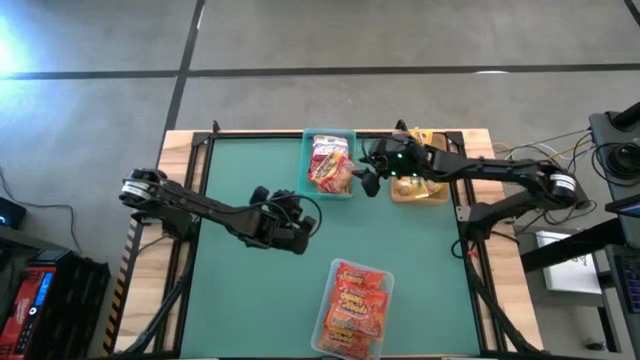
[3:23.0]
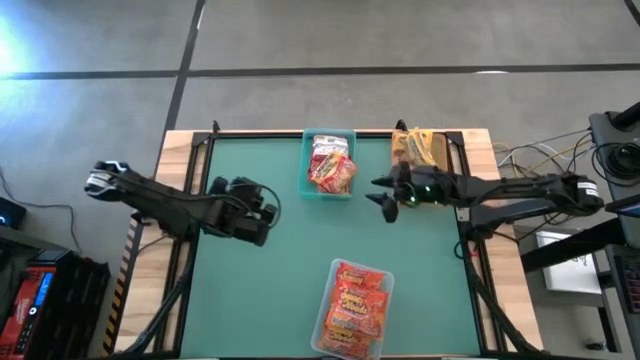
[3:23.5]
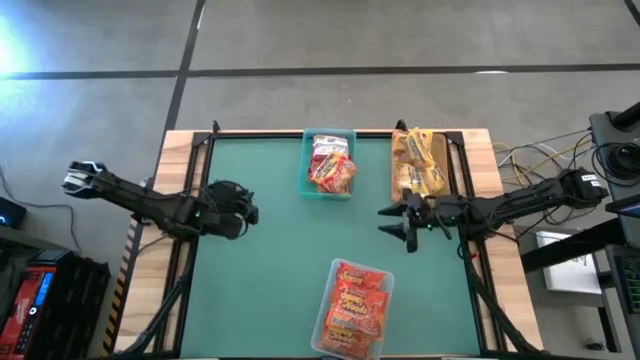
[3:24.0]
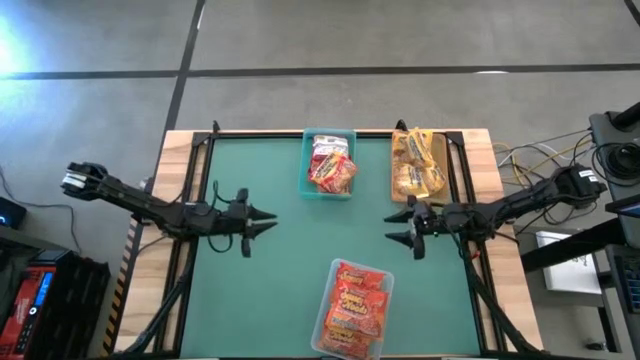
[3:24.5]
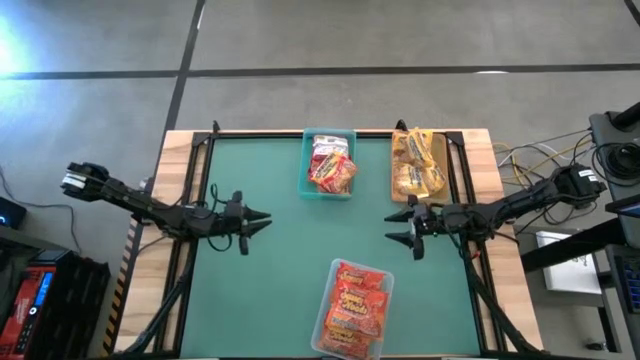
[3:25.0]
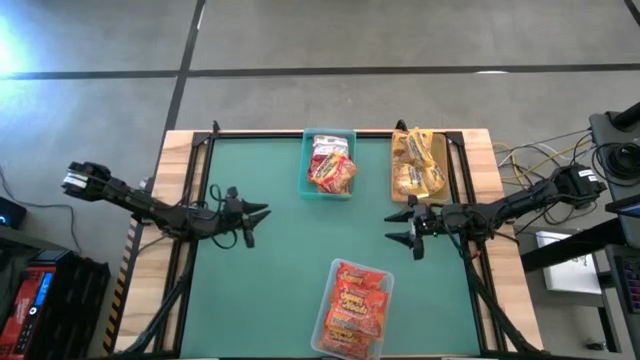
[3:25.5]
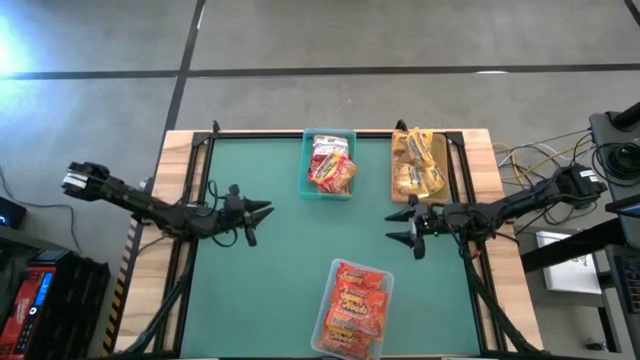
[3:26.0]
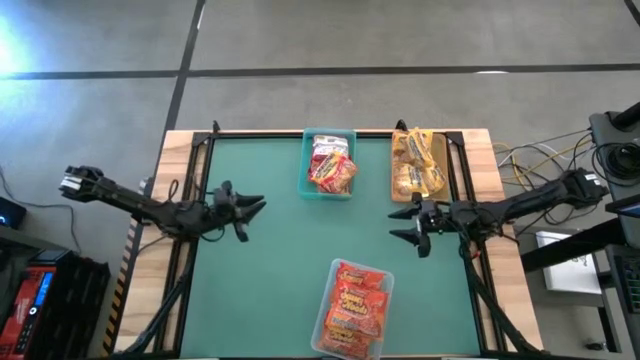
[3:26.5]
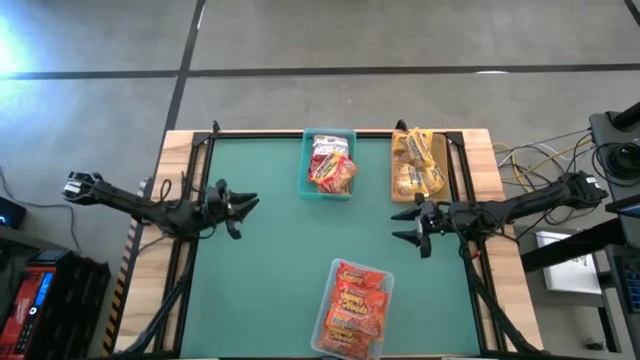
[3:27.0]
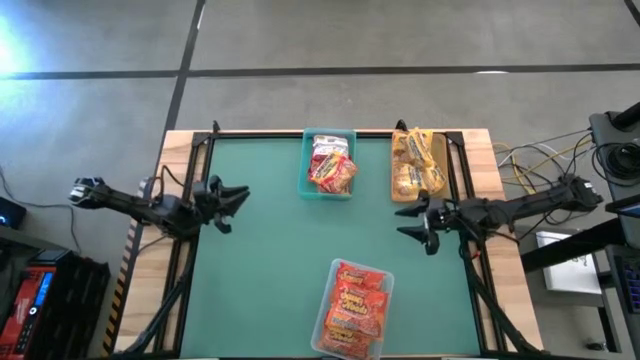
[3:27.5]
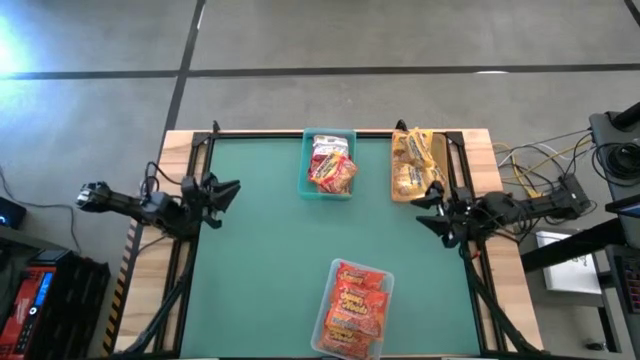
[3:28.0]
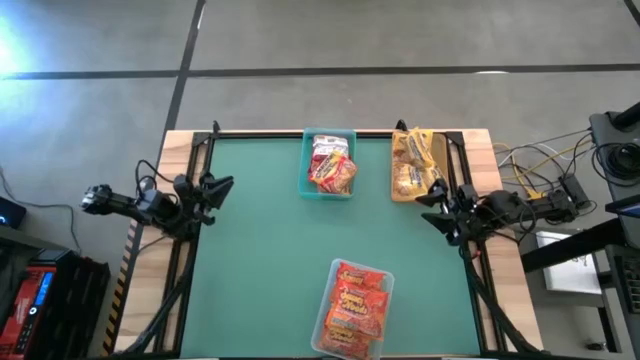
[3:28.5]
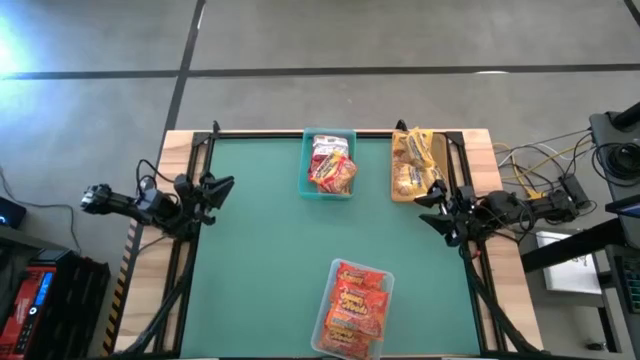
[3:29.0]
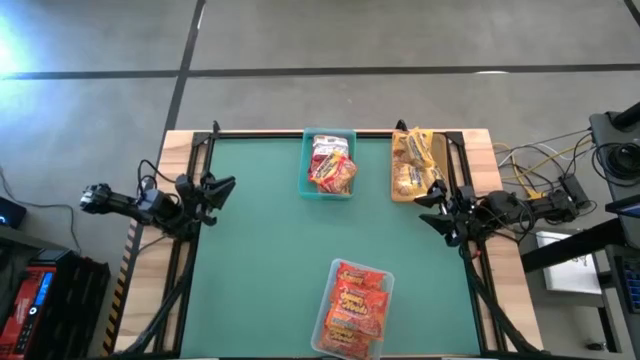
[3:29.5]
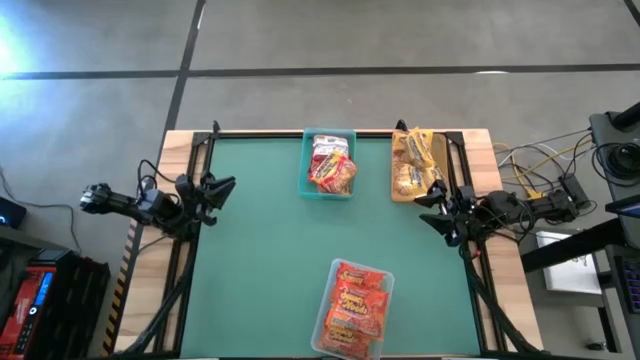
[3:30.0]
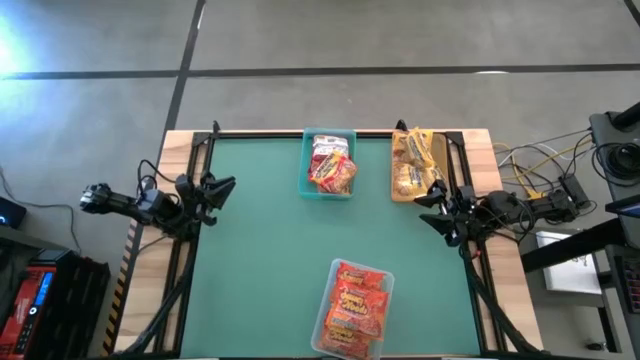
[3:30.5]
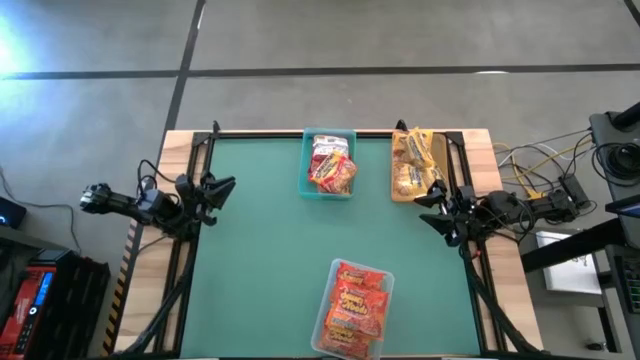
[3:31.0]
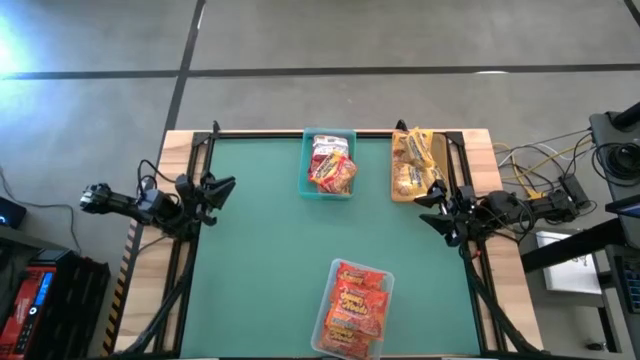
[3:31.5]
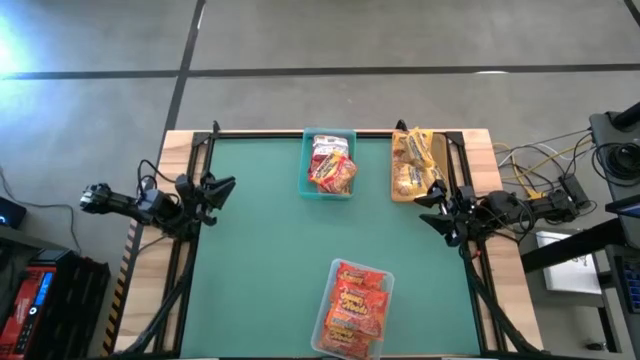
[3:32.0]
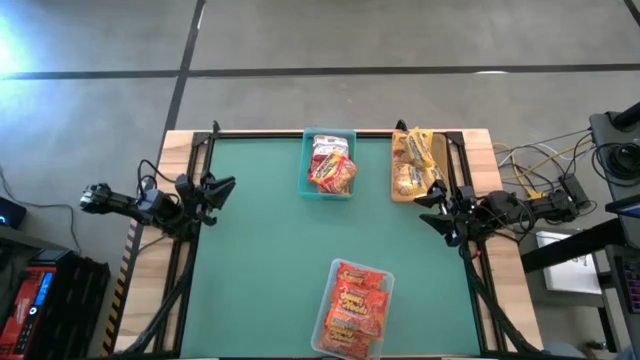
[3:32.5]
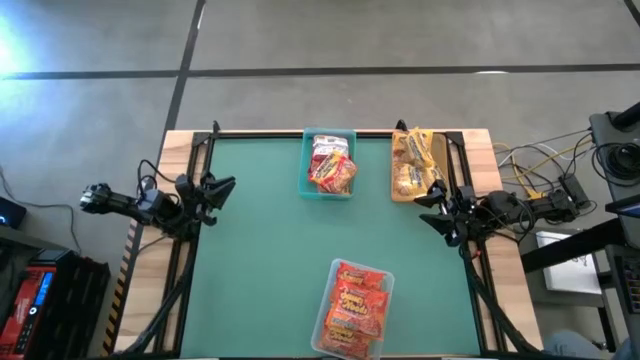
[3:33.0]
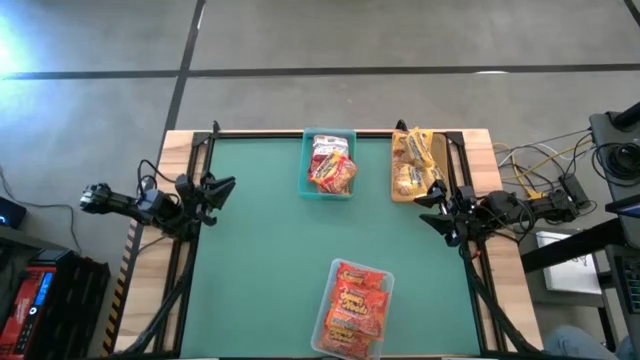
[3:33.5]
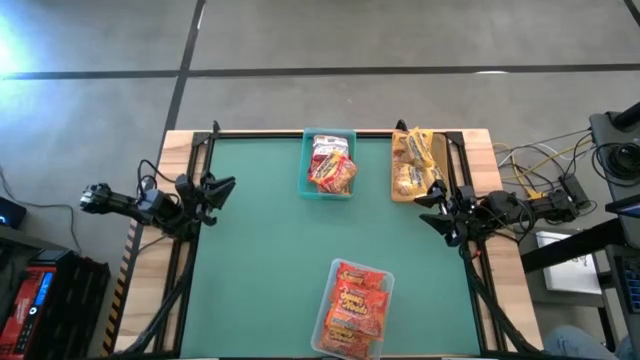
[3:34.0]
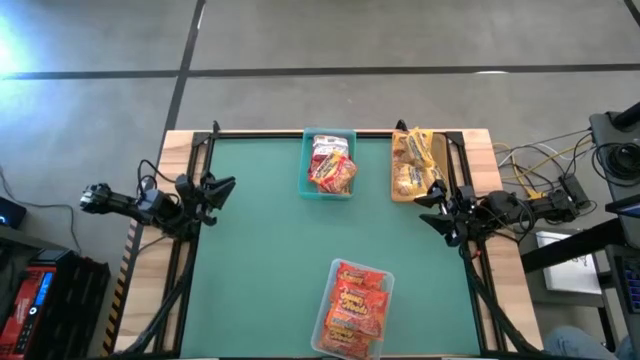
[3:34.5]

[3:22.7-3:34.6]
Task: Sort Maruchan noodles
Return to Home Position

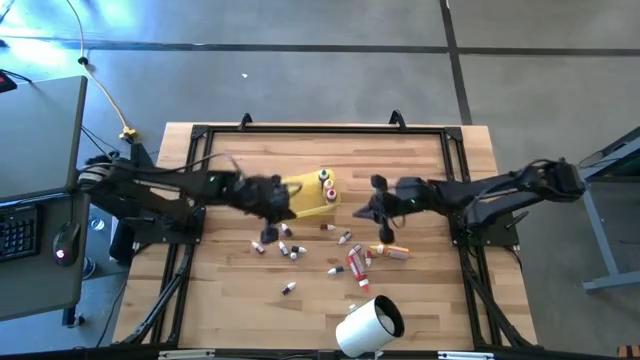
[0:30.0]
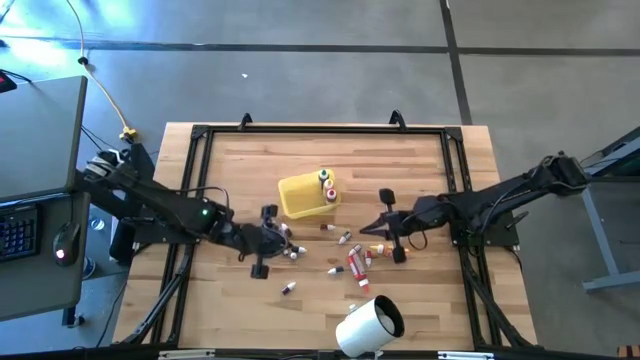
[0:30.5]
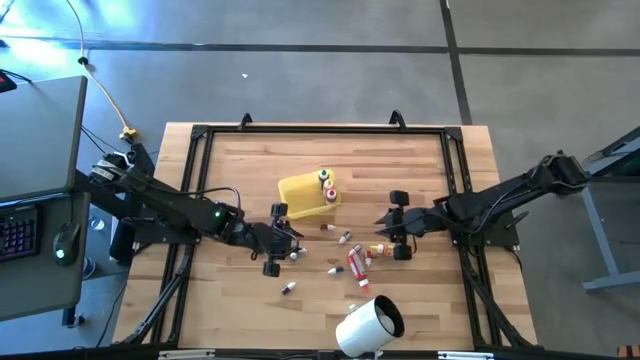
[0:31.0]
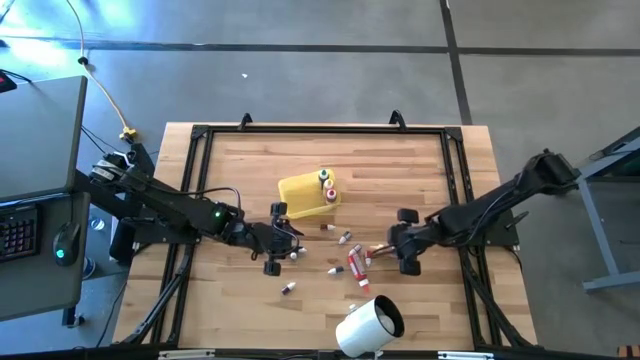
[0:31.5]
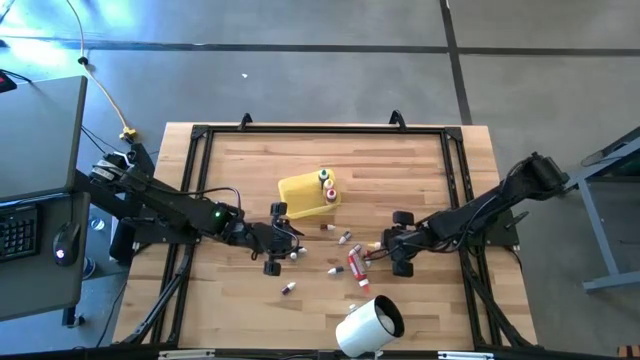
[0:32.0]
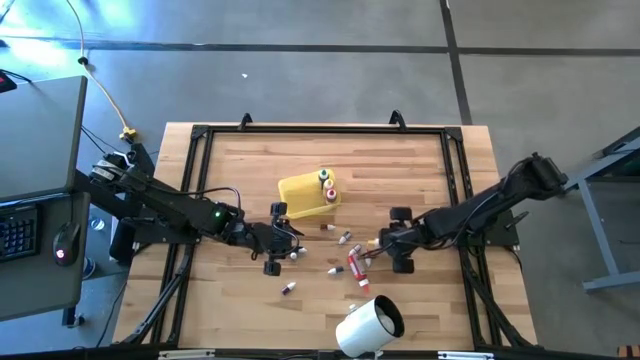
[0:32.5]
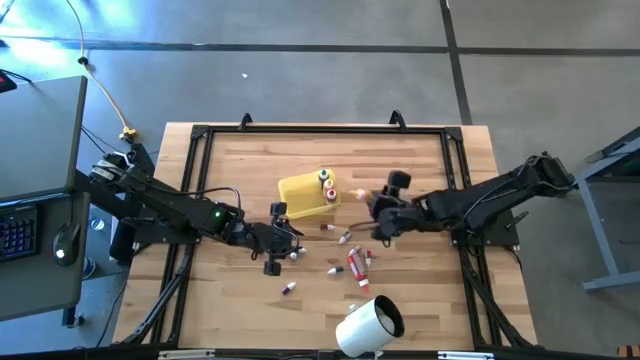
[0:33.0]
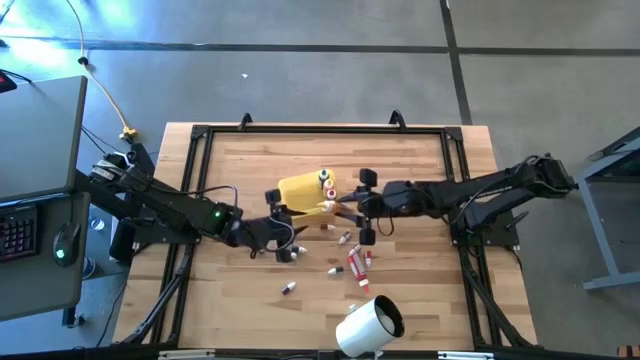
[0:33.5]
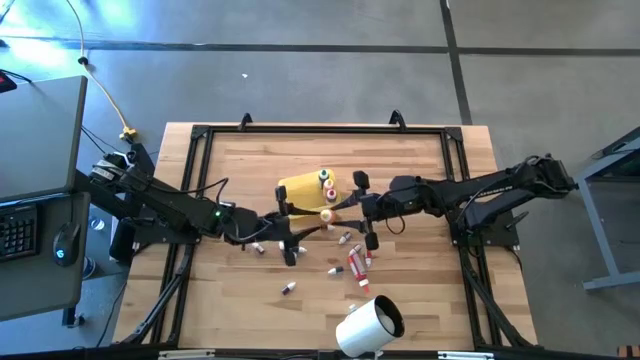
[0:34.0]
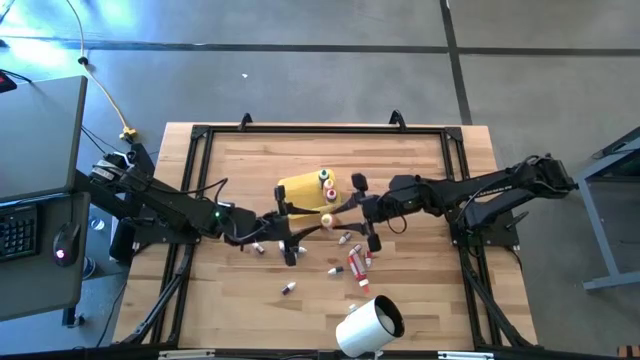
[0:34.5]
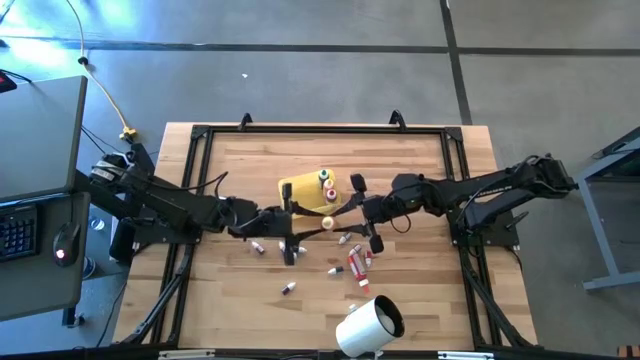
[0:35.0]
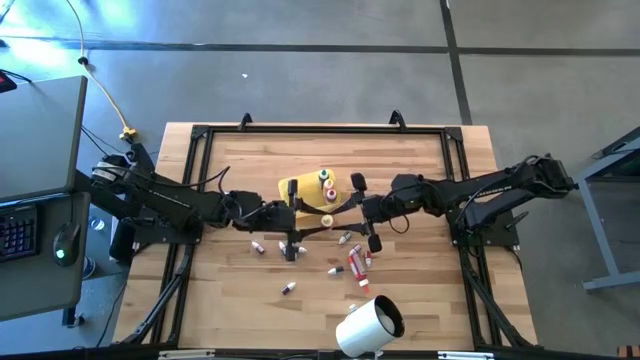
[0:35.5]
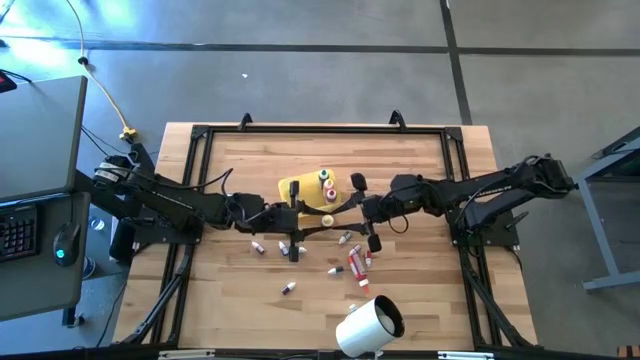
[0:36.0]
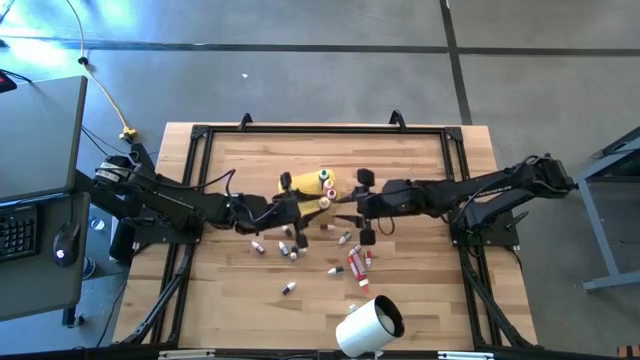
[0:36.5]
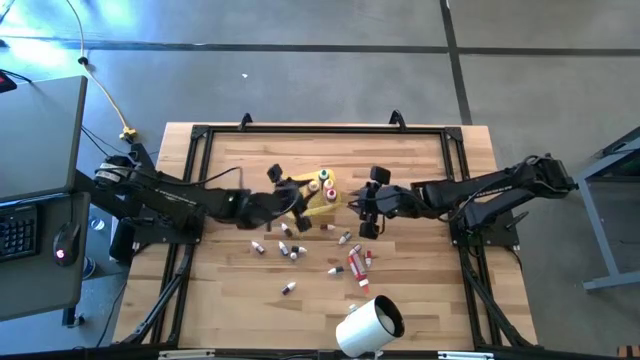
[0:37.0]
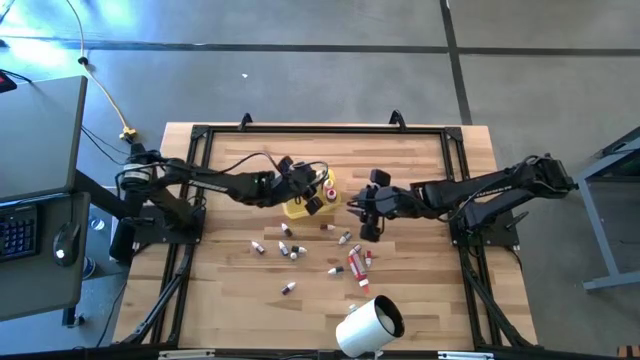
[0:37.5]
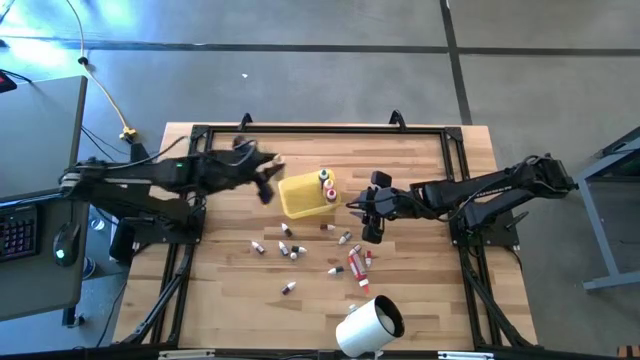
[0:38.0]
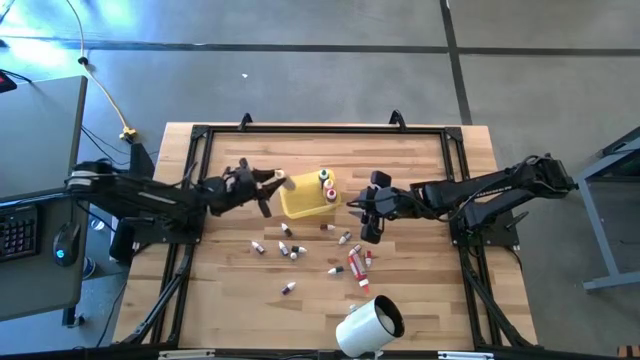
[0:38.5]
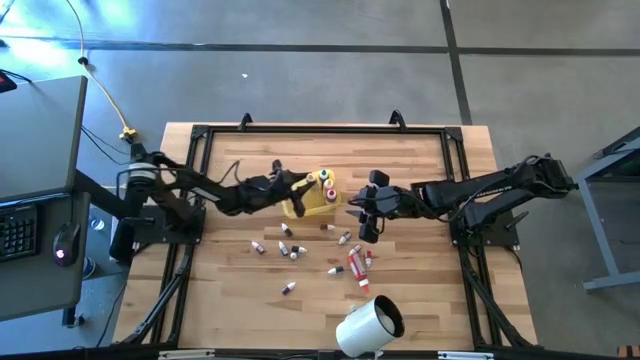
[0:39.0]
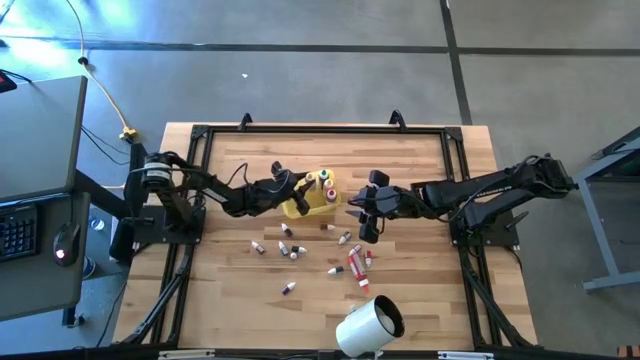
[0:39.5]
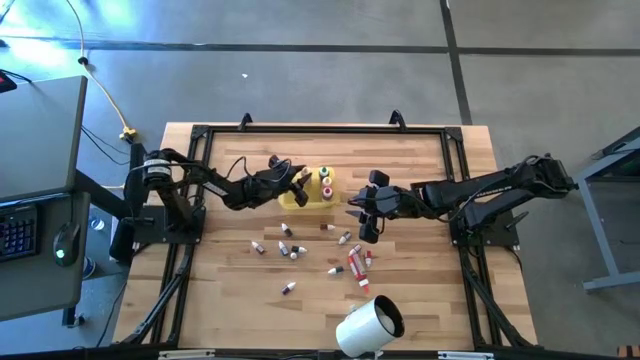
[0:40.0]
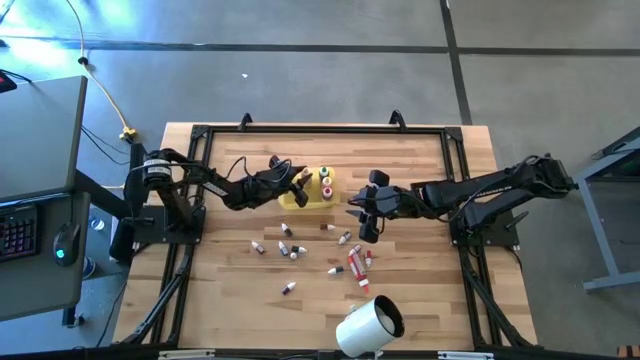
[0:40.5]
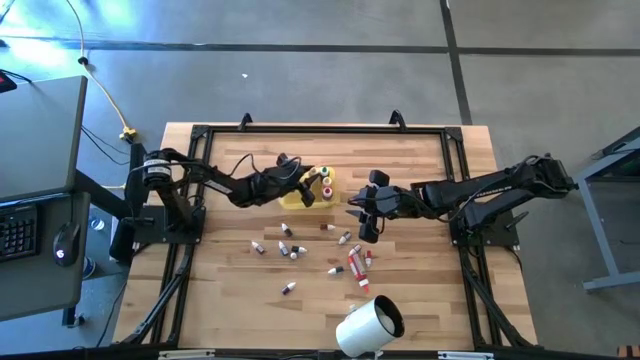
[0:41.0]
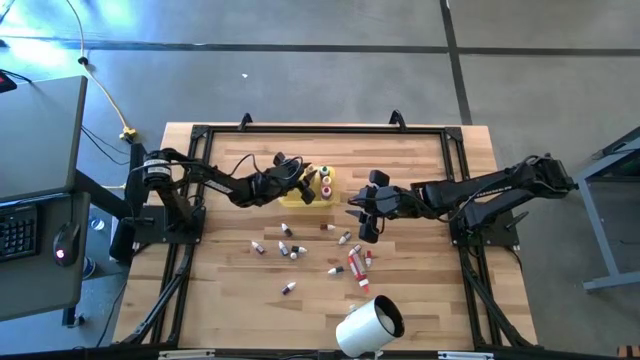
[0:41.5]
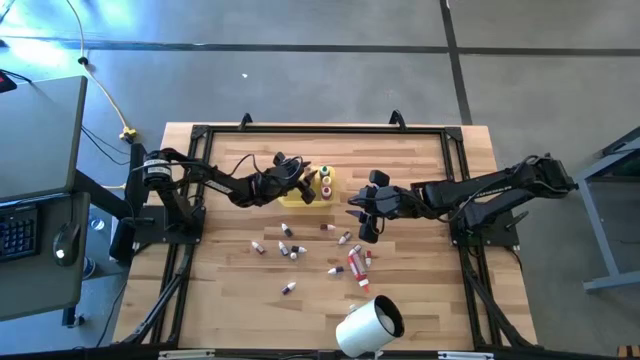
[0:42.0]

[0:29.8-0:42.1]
Task: Pick & Place food coloring
Put the large yellow food coloring bottle into the yellow container
